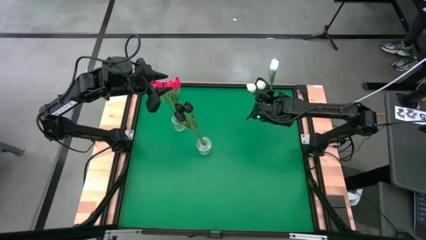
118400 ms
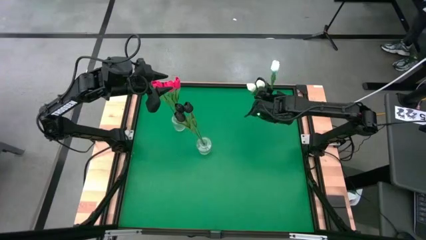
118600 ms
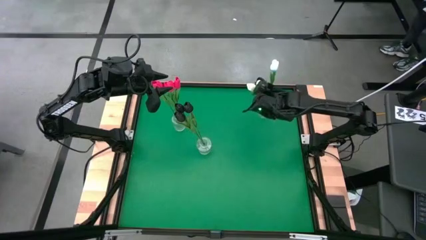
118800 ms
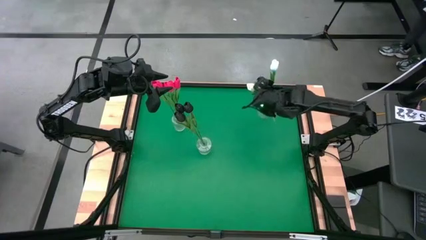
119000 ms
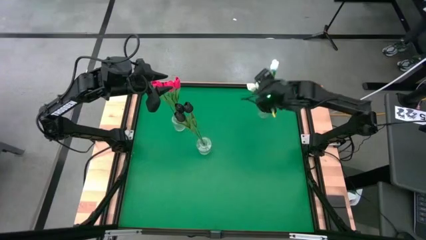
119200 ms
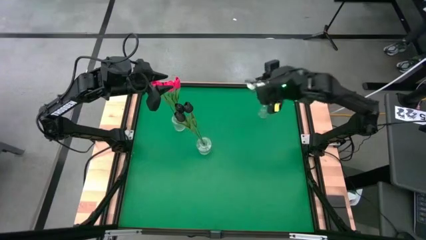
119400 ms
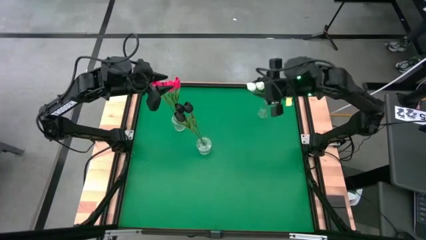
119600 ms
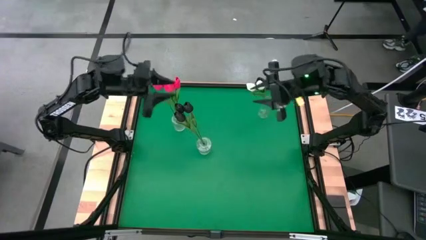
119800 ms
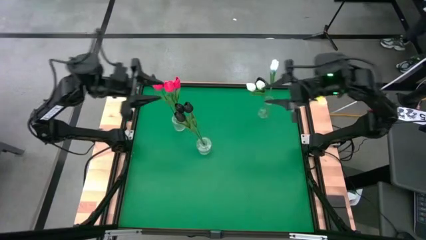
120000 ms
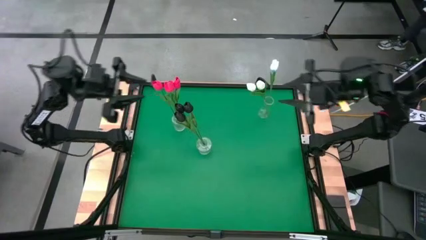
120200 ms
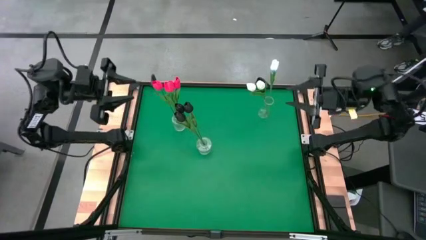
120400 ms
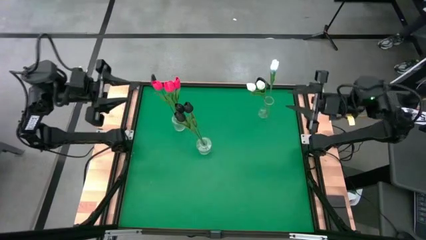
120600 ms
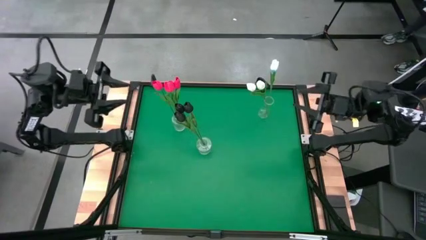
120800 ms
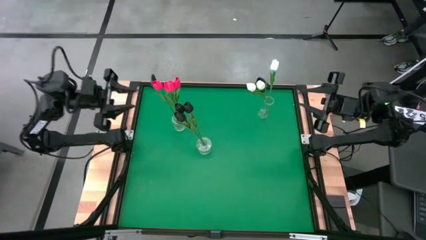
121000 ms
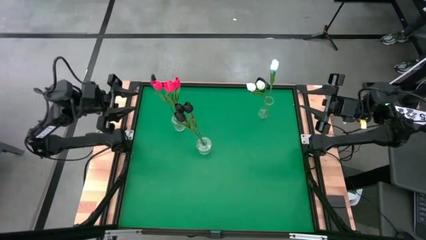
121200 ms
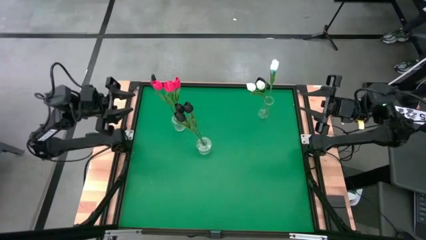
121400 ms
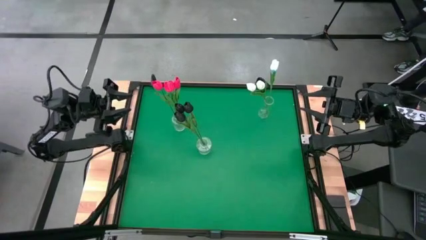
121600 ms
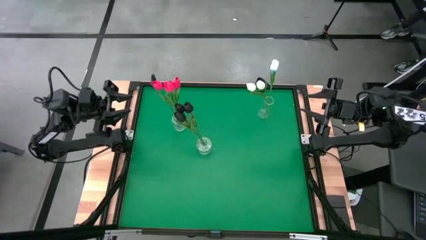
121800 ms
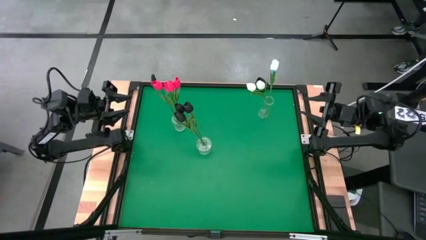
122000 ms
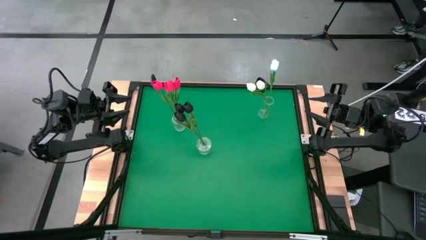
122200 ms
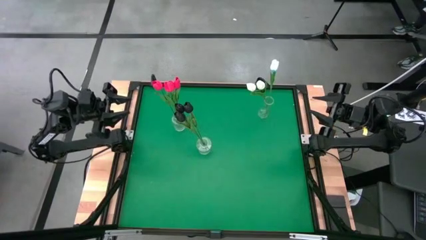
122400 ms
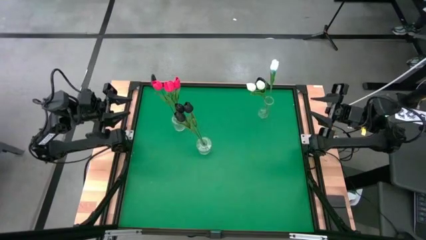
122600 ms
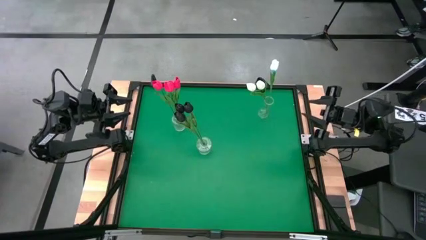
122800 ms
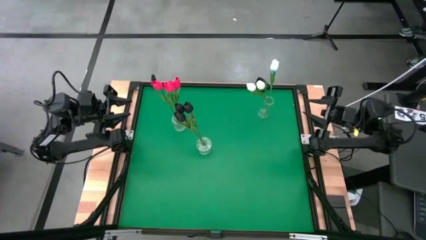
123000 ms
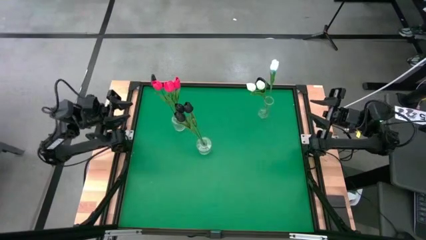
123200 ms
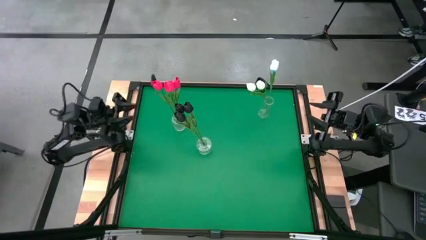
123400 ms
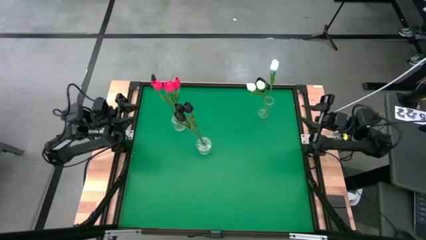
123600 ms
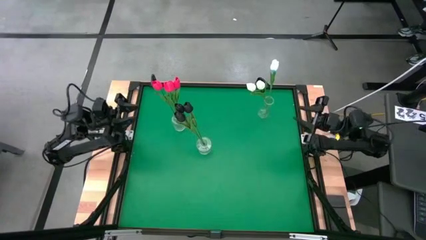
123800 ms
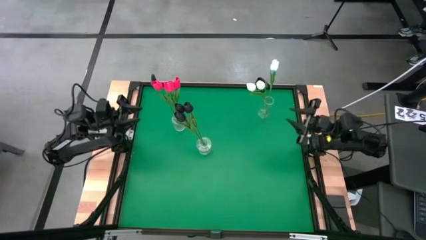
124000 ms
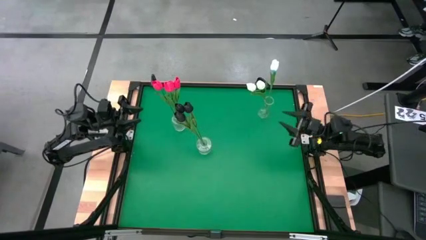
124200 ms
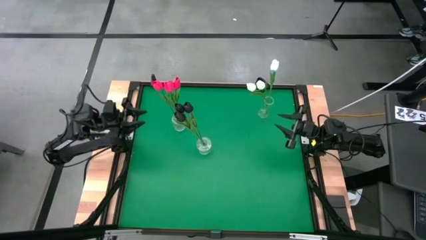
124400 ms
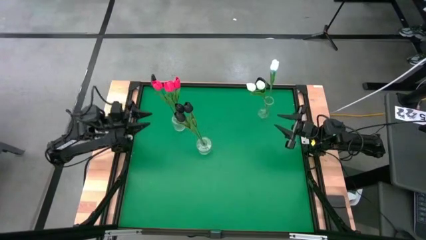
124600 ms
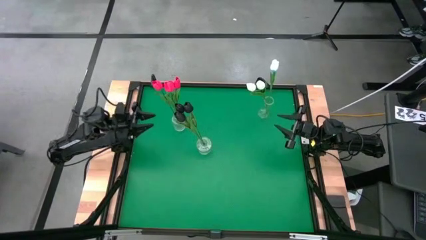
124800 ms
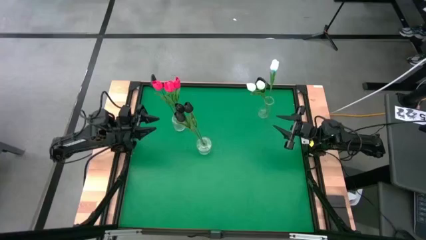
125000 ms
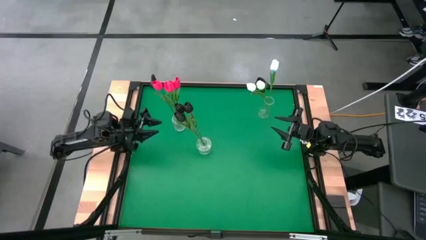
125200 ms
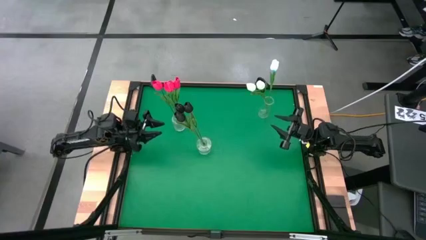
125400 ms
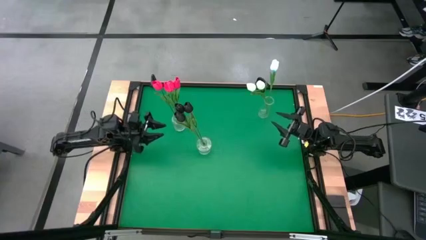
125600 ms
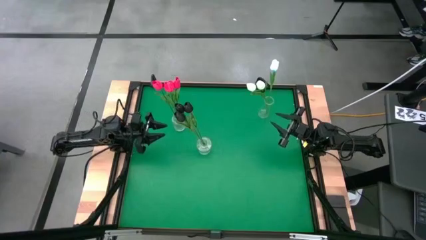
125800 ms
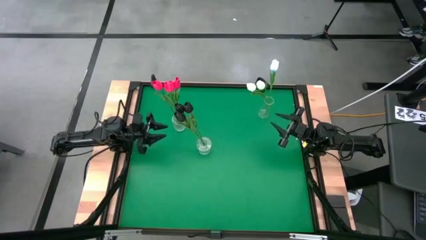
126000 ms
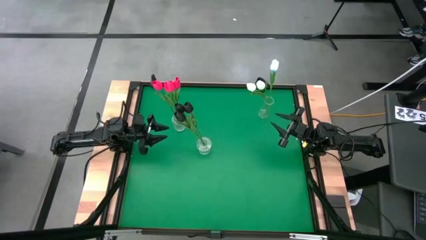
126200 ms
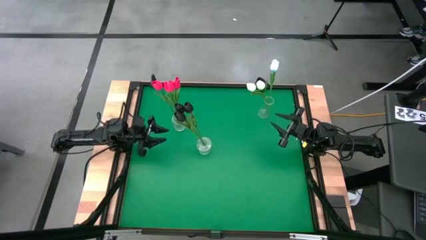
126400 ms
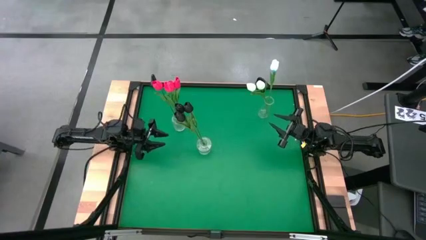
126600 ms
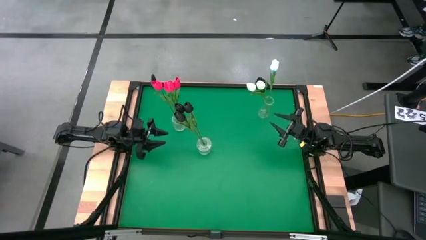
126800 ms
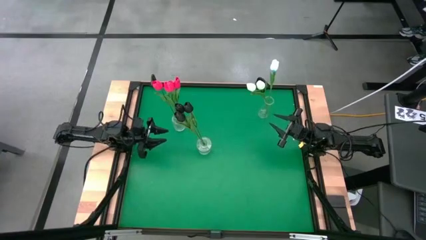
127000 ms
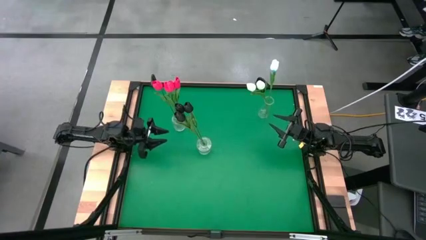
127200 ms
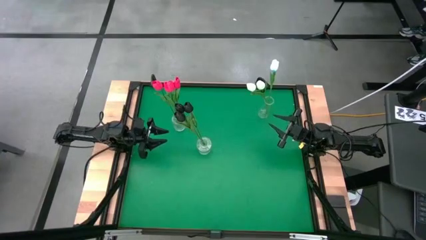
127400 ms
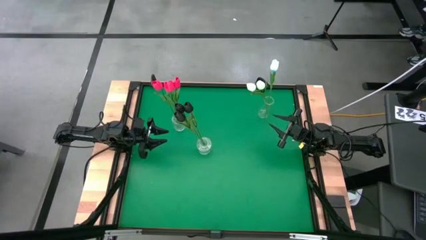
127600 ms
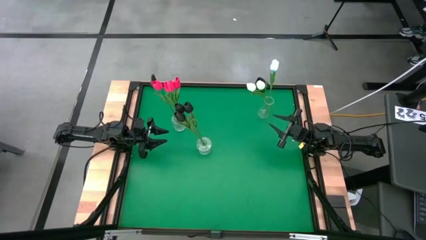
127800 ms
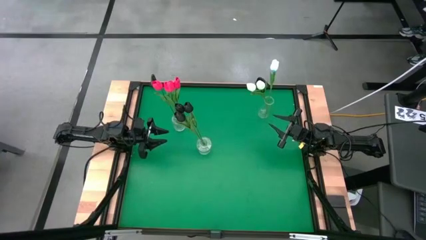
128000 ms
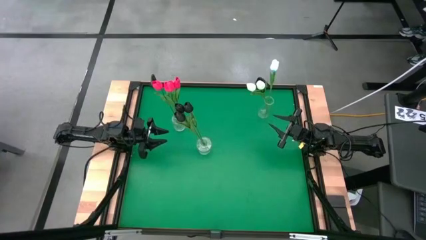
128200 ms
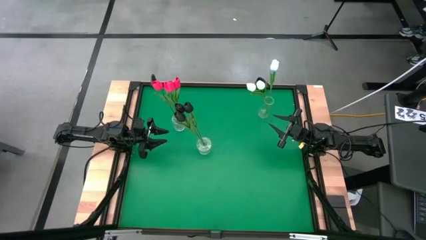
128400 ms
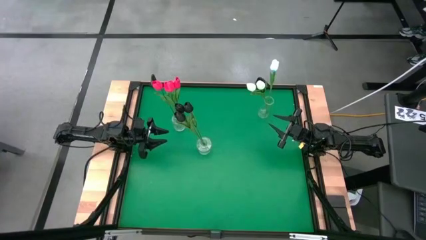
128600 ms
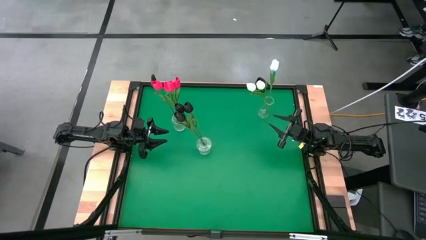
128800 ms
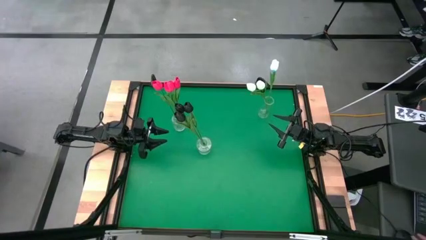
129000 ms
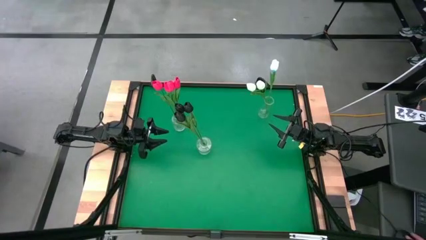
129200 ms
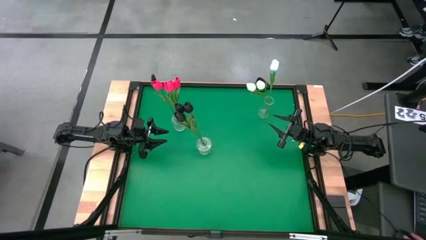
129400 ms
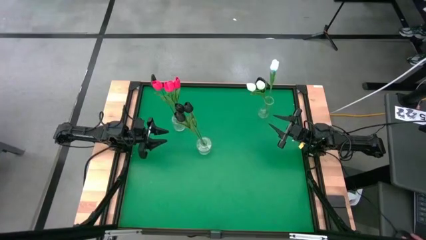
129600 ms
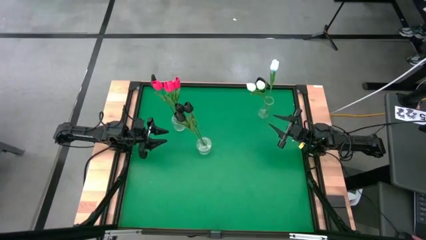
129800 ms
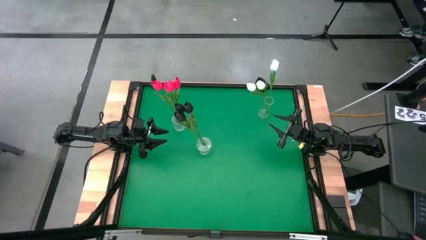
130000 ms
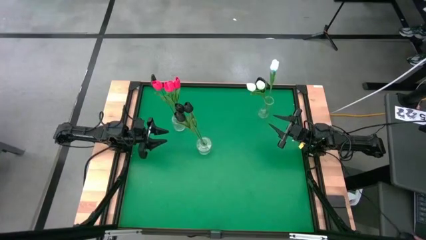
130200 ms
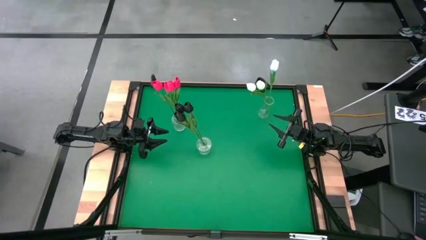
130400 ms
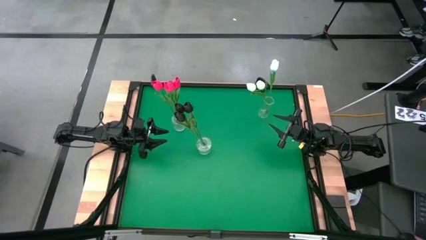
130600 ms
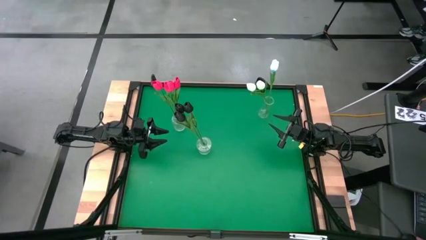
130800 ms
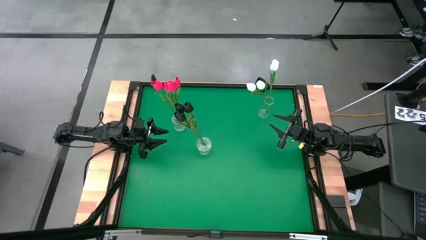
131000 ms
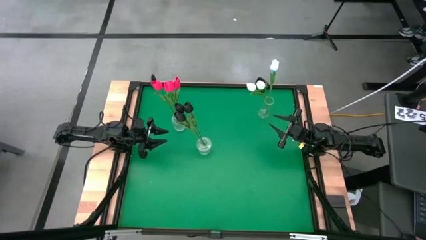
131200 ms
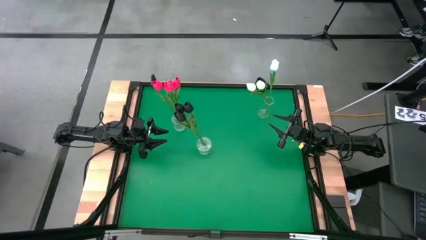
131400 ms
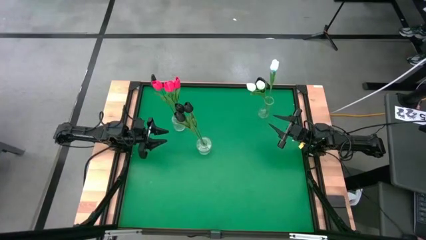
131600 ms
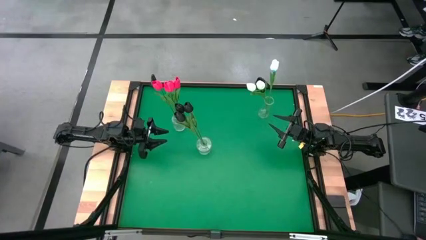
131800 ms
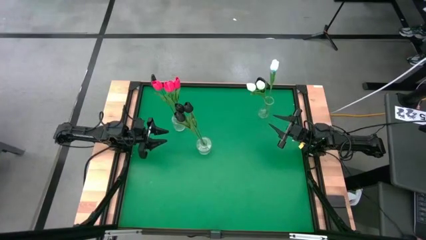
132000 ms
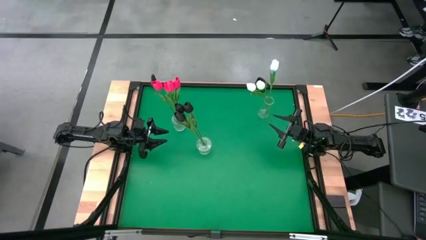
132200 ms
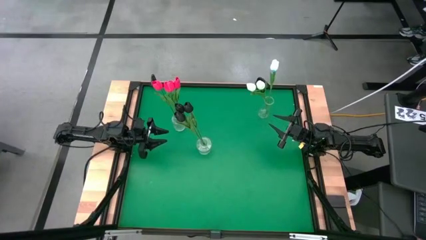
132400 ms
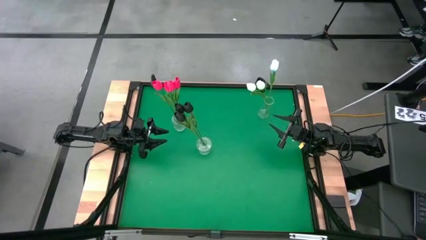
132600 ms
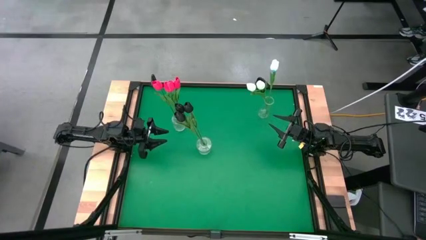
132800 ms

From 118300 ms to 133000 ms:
Task: Sort flowers into vase by color
Return to Home Position
